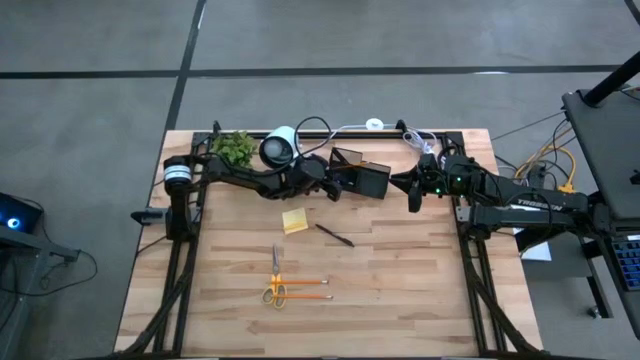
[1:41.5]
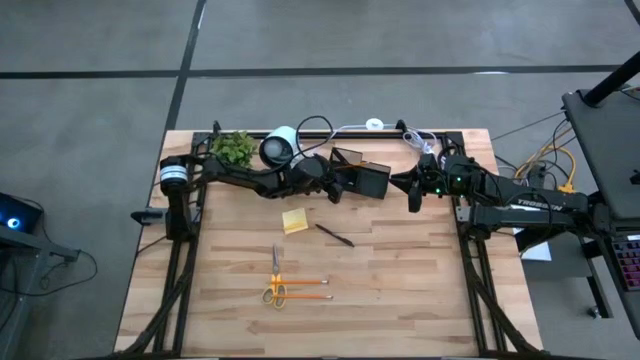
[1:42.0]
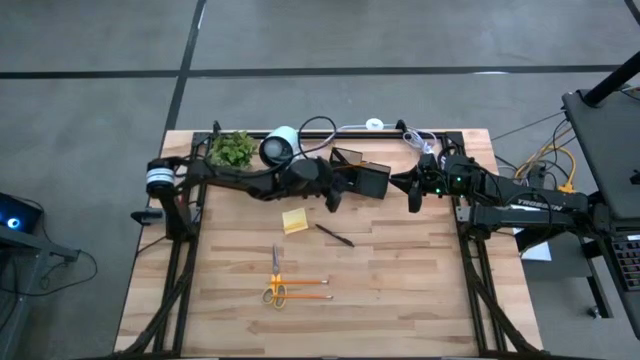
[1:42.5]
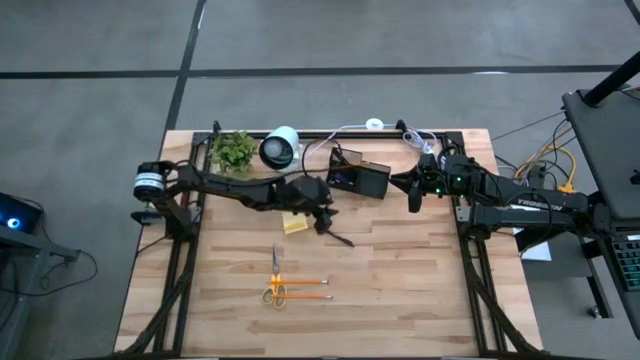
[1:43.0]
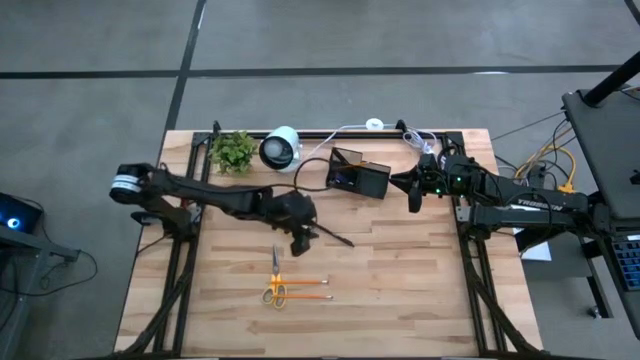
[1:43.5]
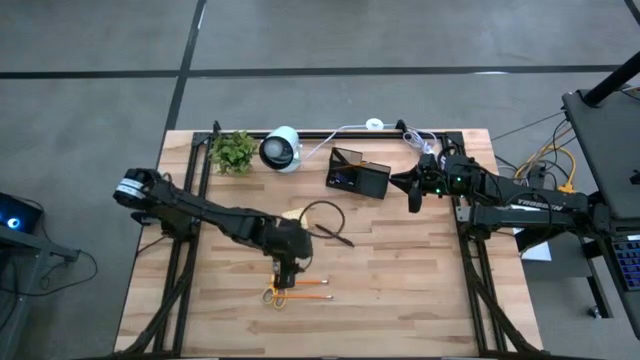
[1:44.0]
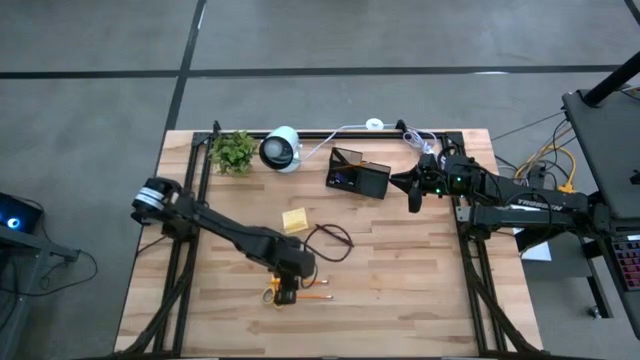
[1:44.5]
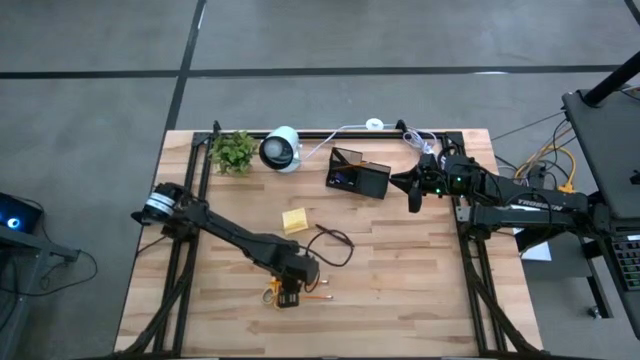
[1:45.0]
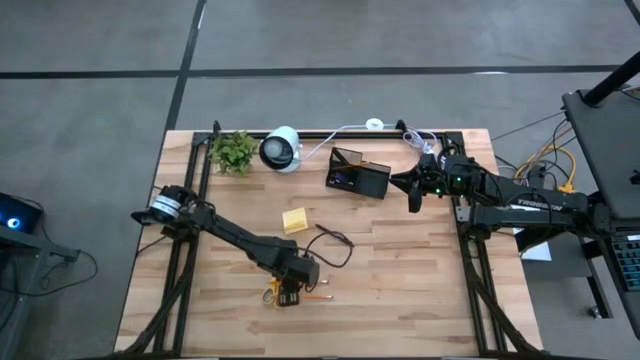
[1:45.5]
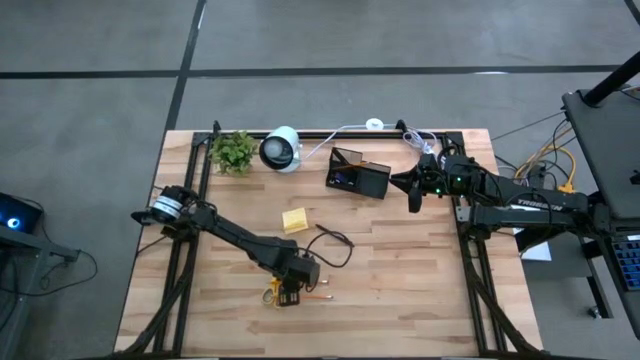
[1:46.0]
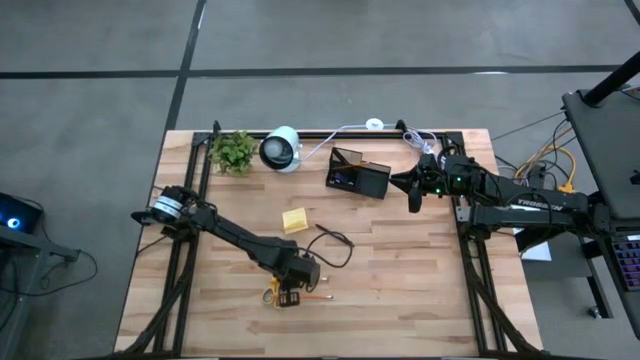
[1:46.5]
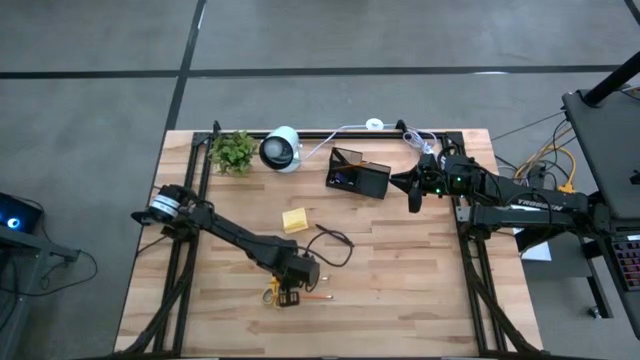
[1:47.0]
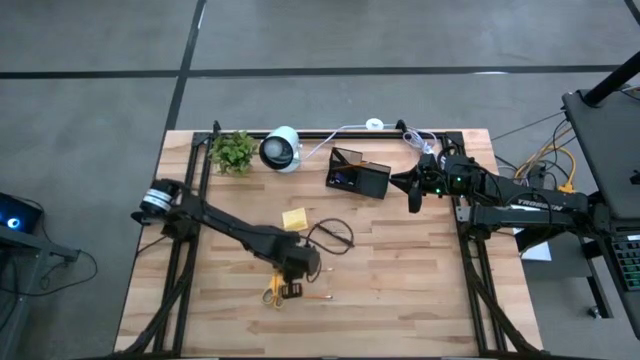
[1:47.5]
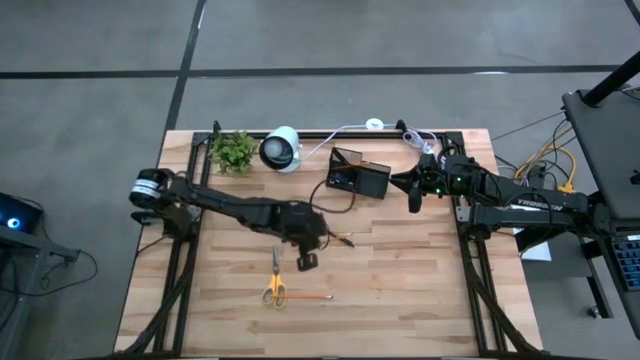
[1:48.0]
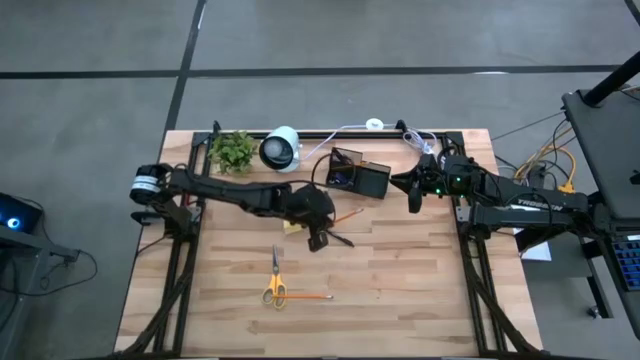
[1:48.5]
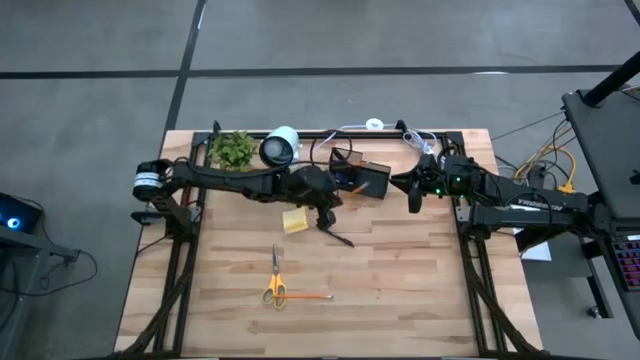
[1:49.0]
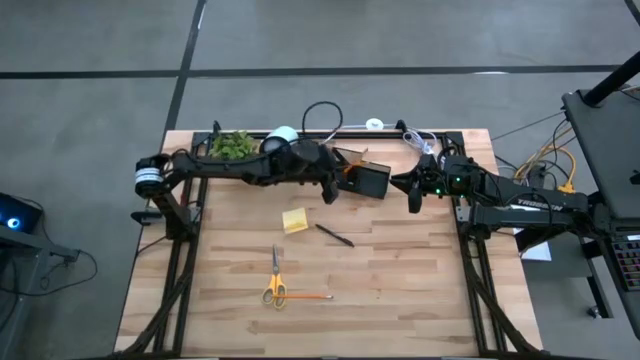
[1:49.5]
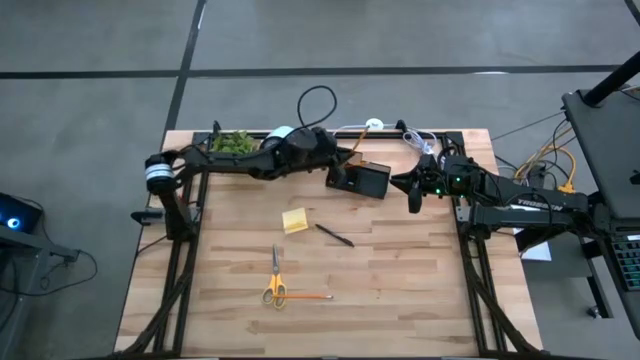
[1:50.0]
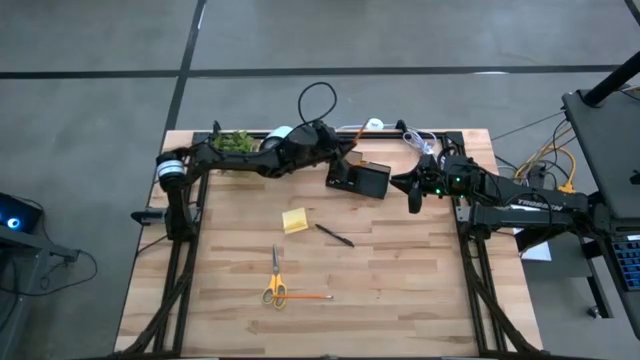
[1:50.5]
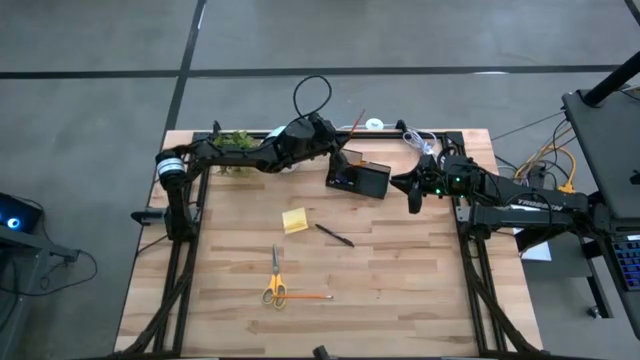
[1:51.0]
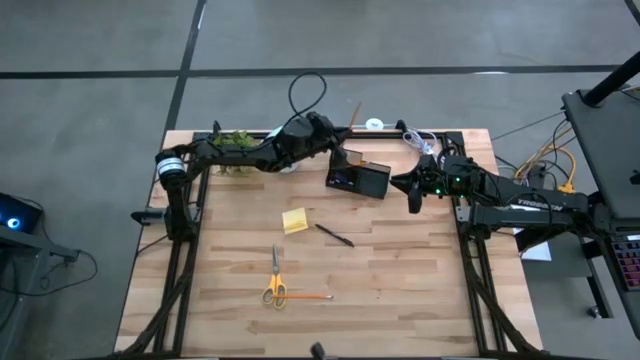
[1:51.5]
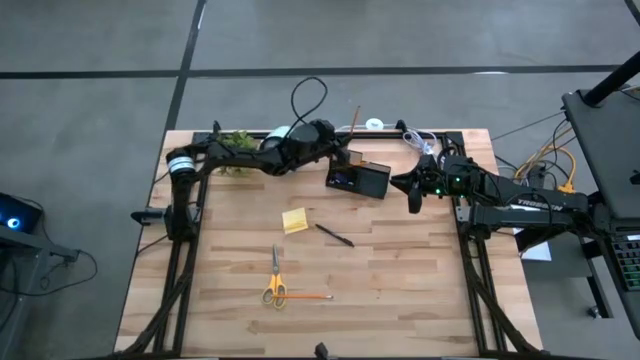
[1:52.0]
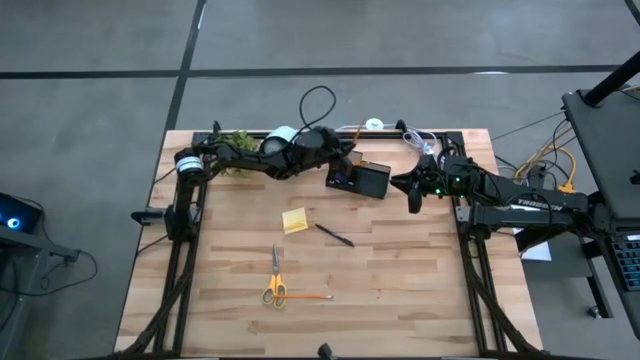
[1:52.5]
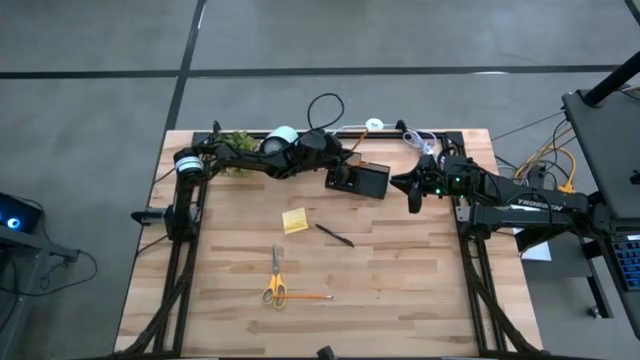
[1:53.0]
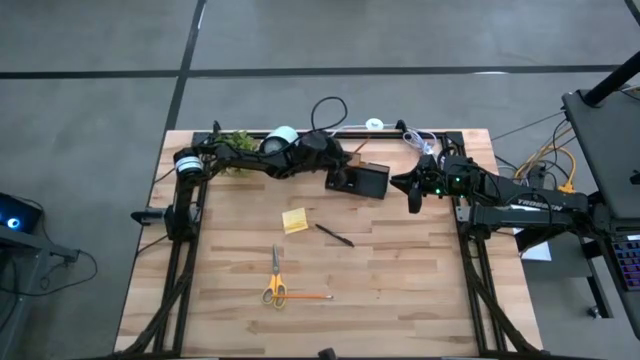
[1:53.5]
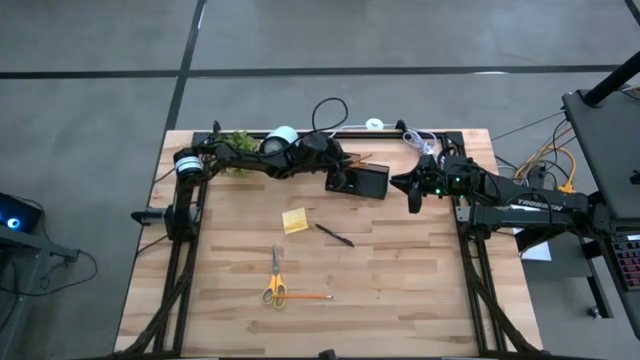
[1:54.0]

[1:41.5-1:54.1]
Task: Pick and place office supplies into organizer
Put the top pencil into the desk organizer

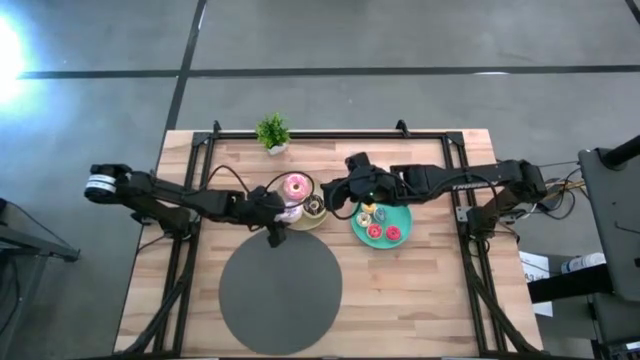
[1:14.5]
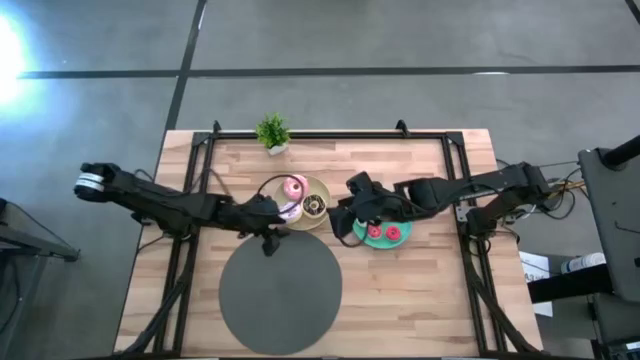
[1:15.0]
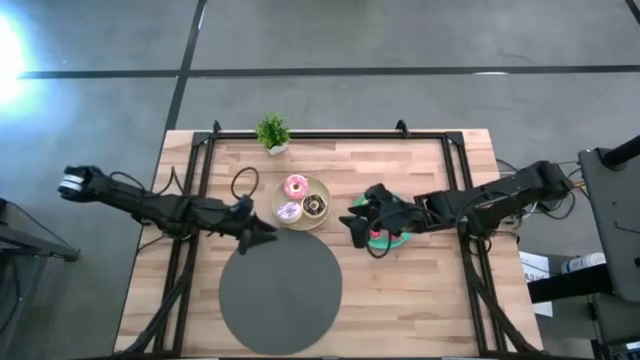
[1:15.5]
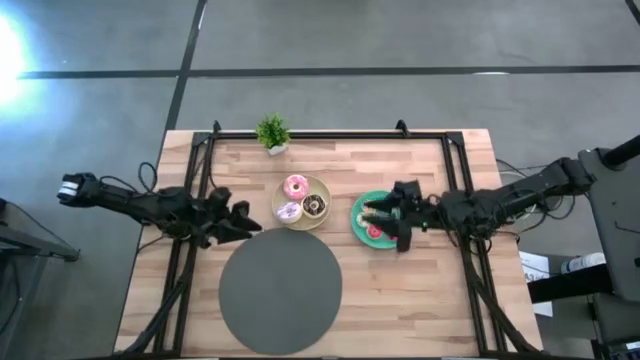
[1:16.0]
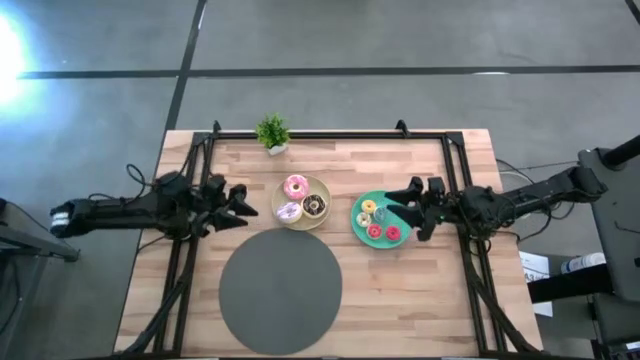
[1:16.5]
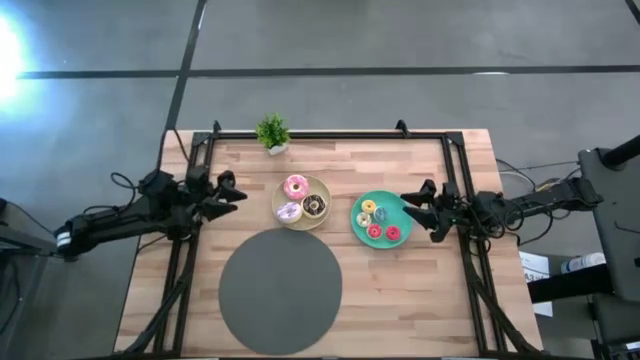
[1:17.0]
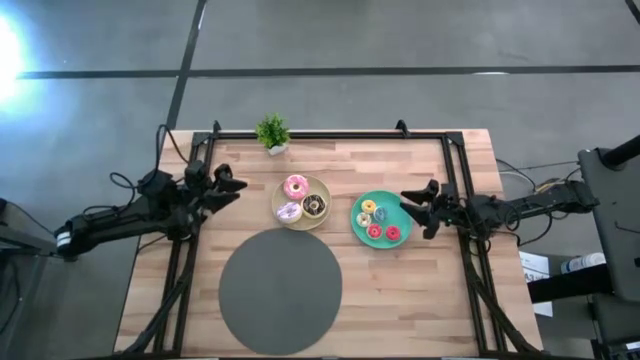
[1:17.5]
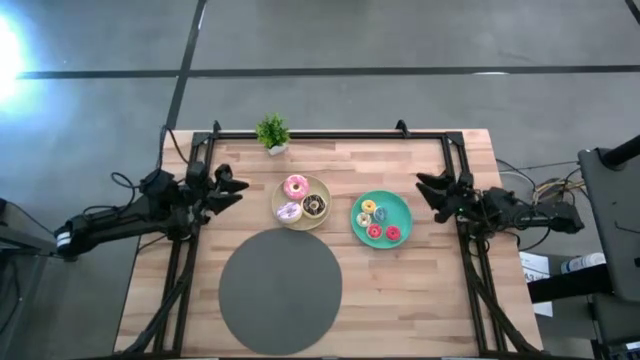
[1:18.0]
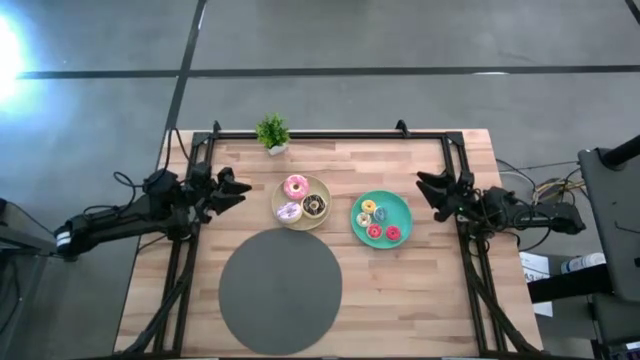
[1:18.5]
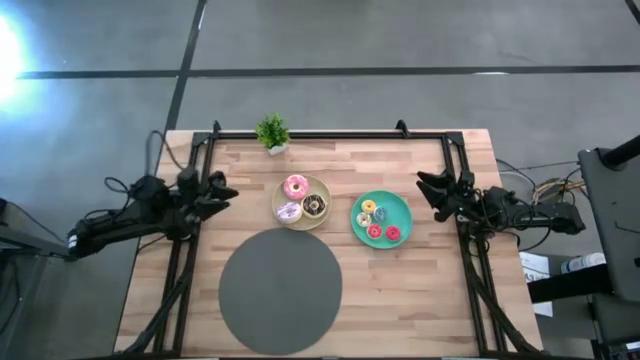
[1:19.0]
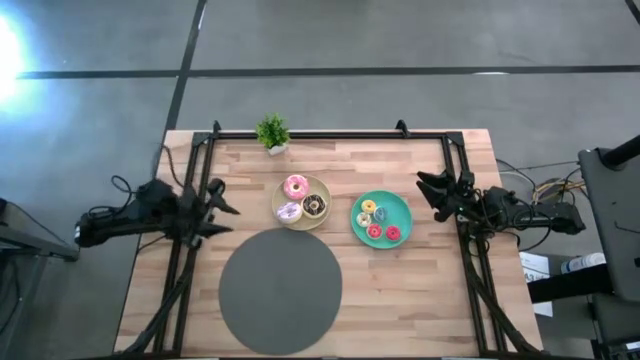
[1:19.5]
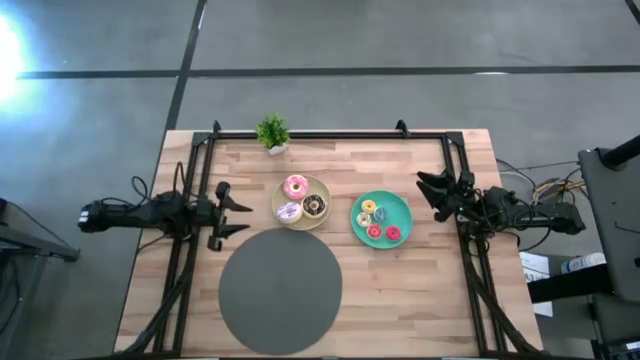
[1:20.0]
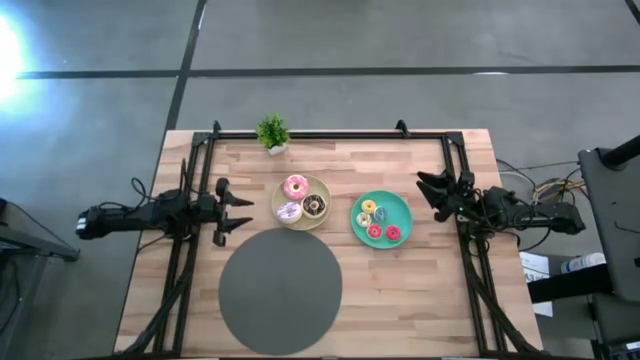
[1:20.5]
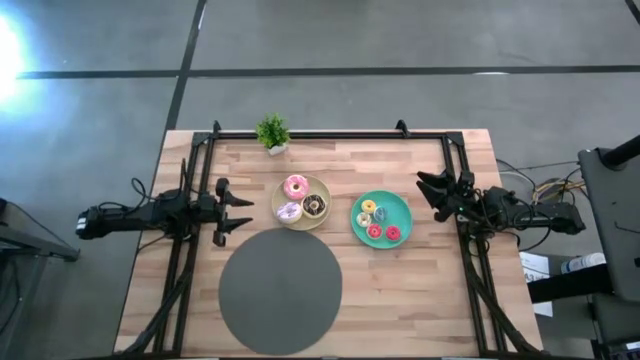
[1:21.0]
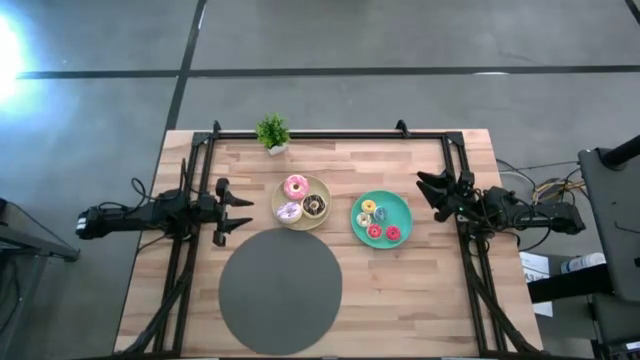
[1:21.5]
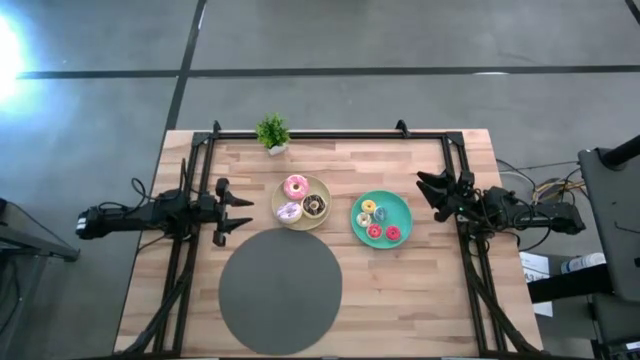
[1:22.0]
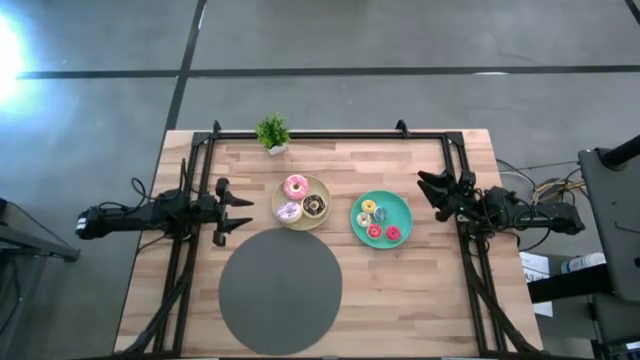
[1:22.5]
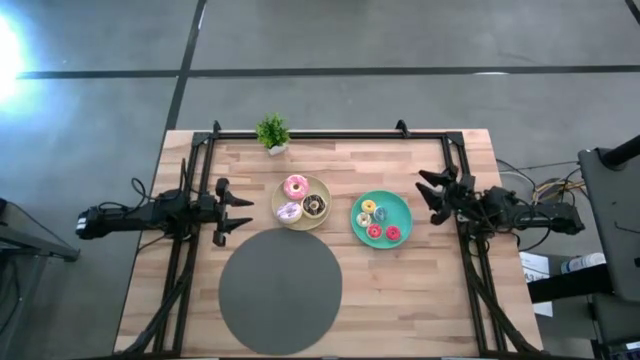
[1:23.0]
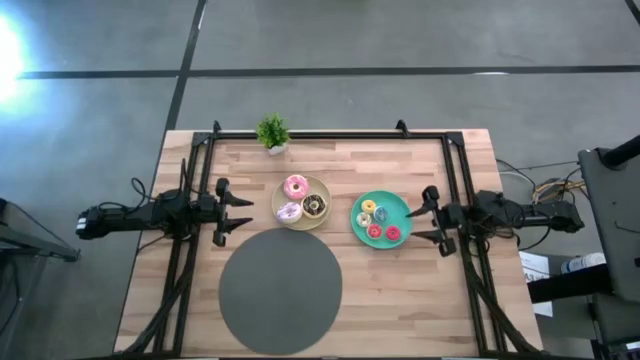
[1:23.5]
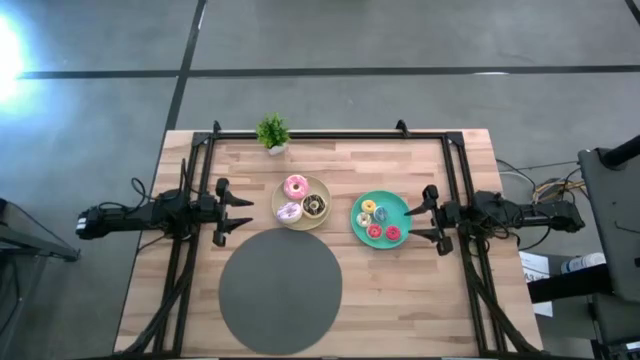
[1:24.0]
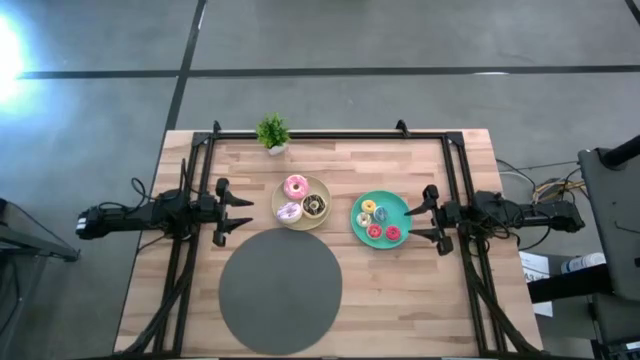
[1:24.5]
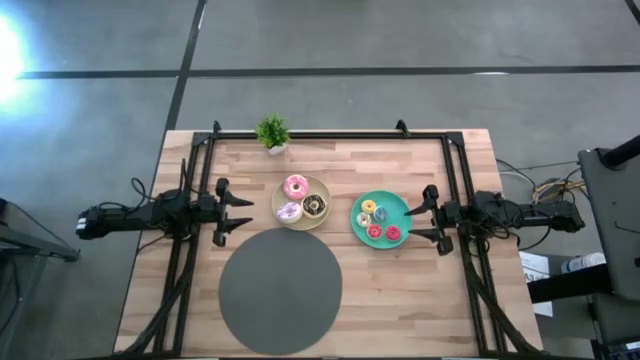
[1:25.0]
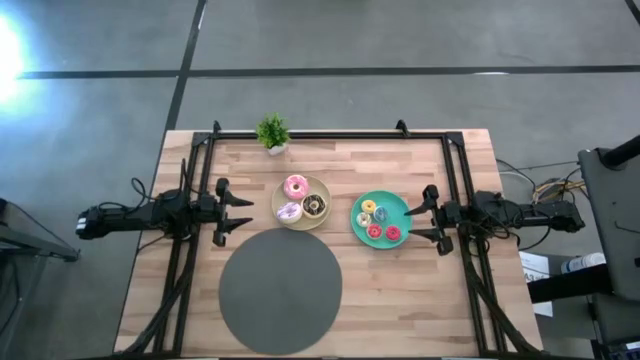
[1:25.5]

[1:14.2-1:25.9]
Task: Pick & Place donuts
Return to Home Position
